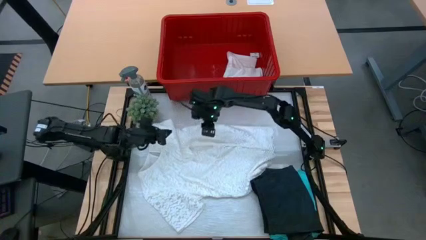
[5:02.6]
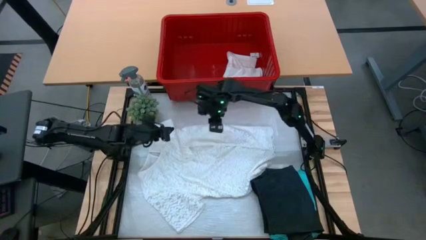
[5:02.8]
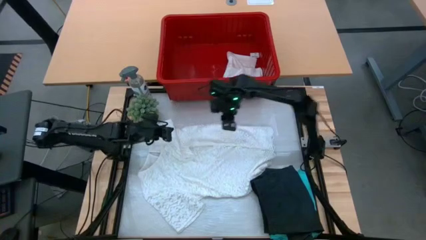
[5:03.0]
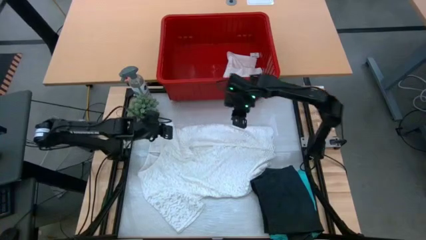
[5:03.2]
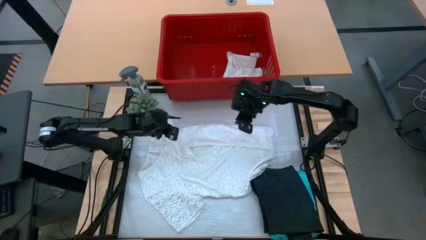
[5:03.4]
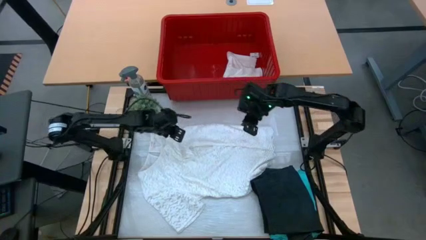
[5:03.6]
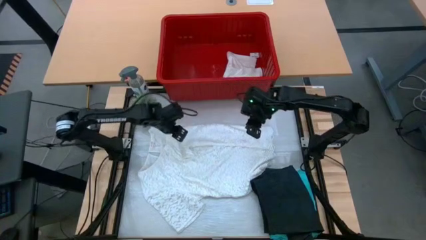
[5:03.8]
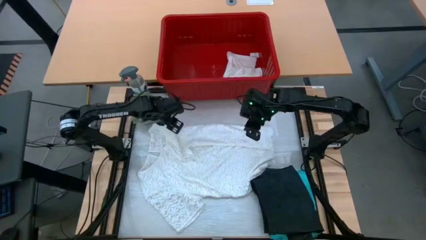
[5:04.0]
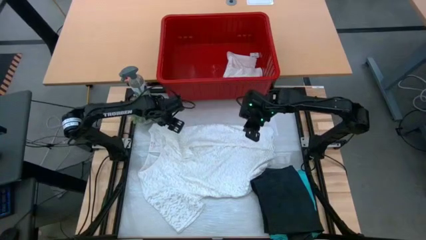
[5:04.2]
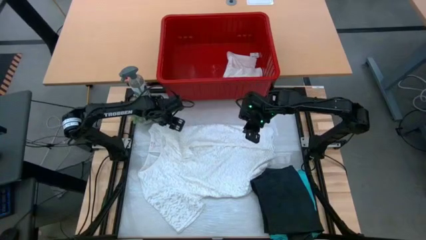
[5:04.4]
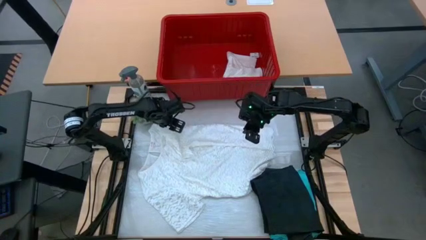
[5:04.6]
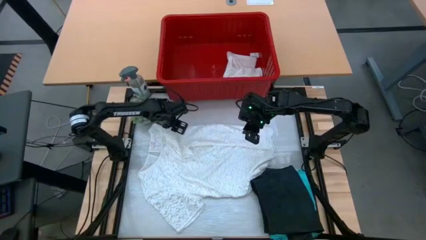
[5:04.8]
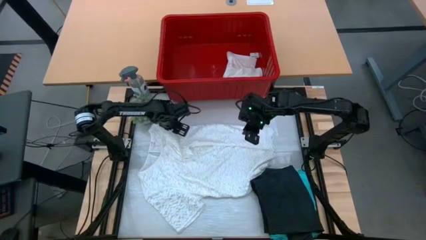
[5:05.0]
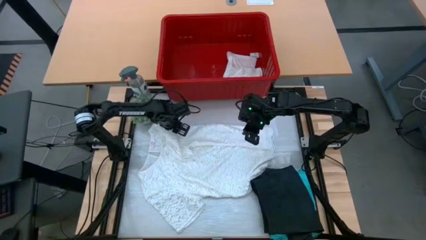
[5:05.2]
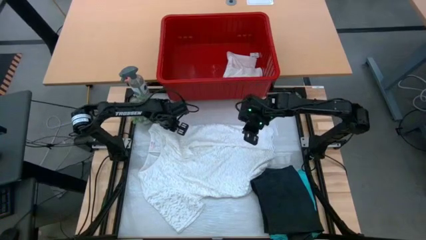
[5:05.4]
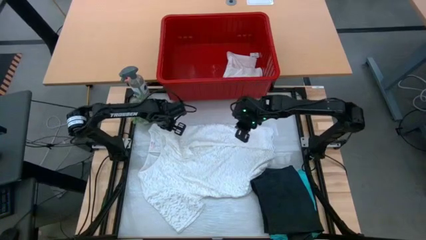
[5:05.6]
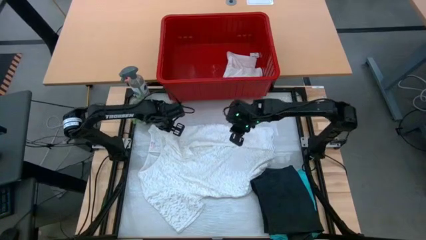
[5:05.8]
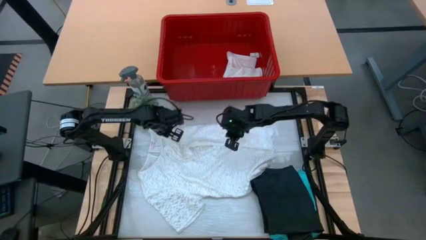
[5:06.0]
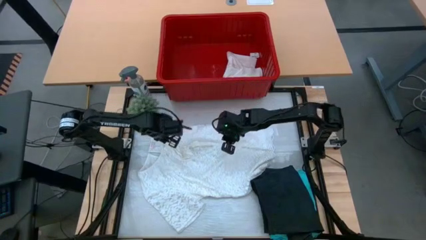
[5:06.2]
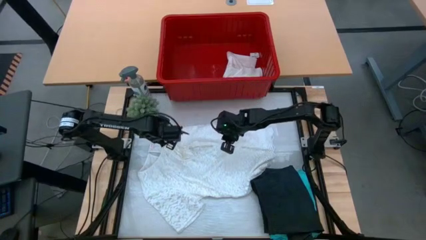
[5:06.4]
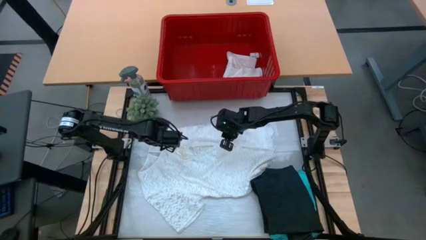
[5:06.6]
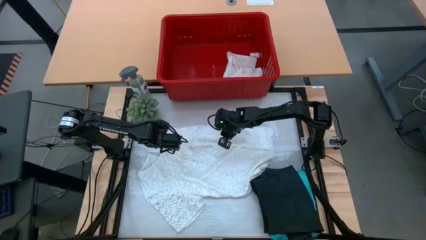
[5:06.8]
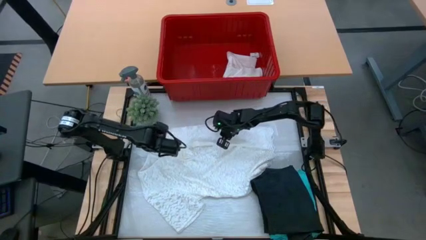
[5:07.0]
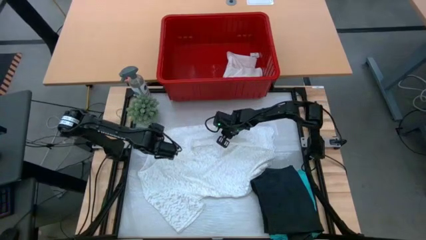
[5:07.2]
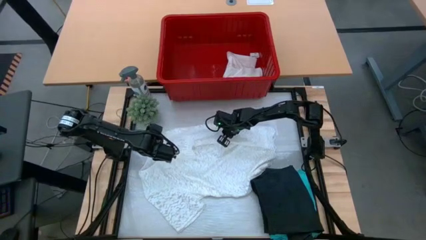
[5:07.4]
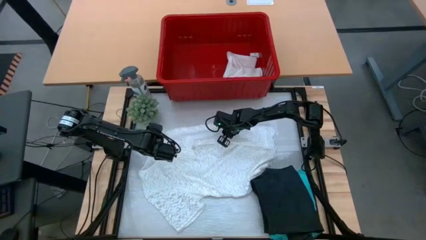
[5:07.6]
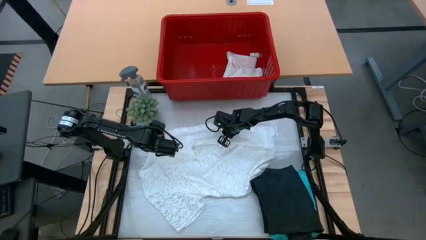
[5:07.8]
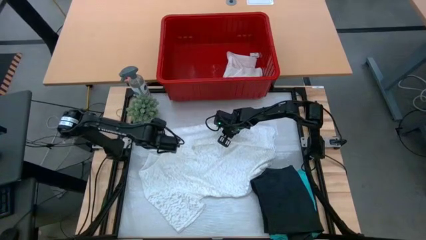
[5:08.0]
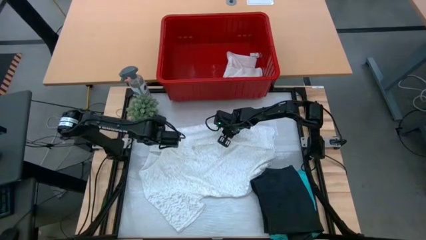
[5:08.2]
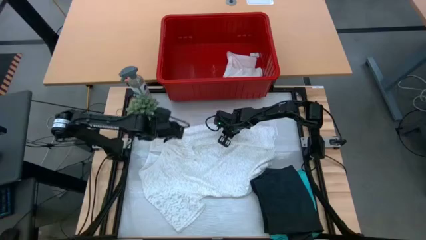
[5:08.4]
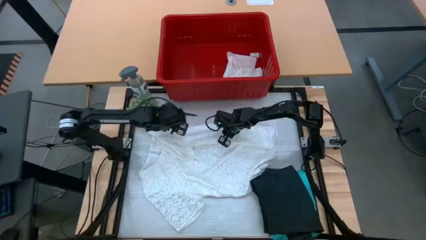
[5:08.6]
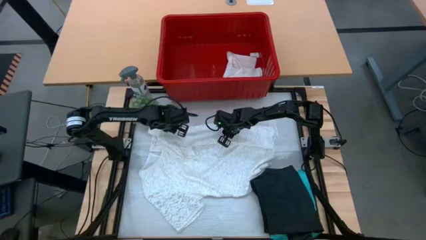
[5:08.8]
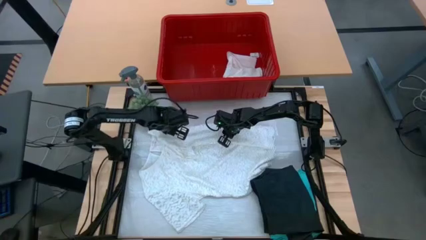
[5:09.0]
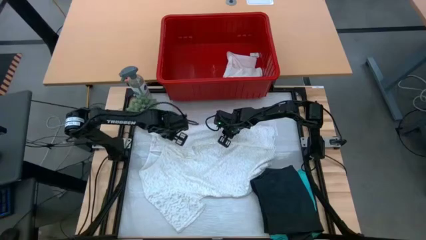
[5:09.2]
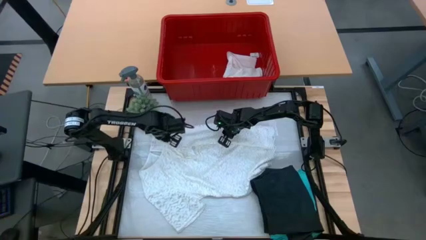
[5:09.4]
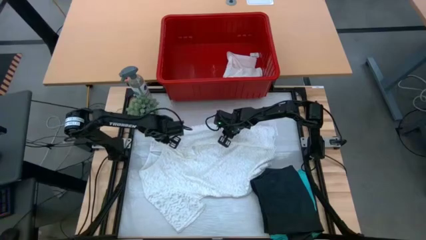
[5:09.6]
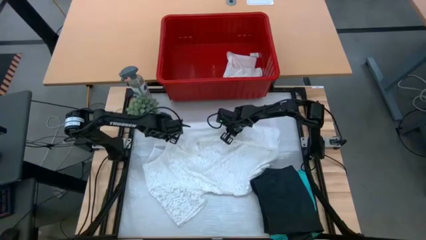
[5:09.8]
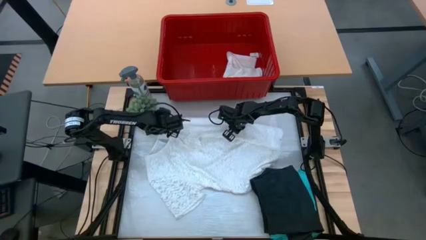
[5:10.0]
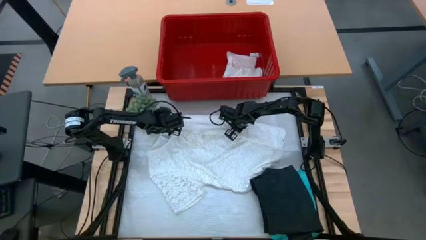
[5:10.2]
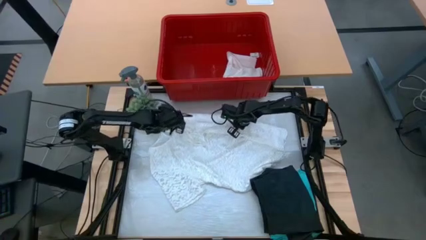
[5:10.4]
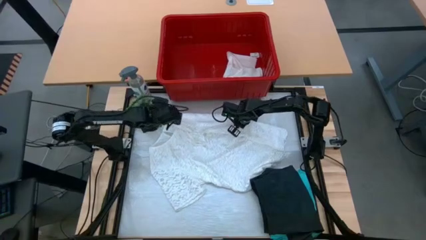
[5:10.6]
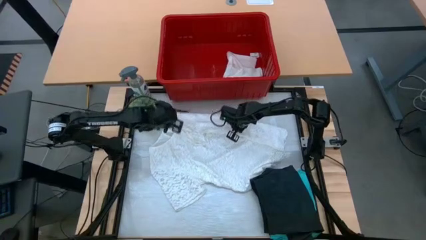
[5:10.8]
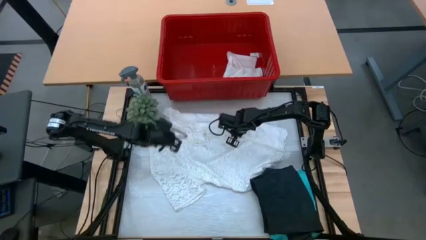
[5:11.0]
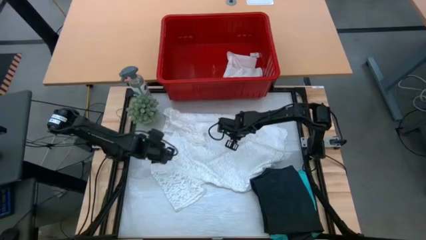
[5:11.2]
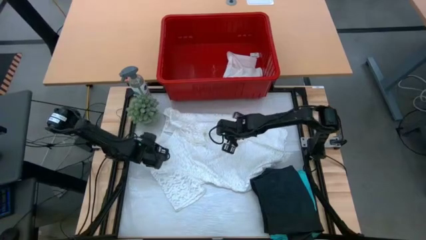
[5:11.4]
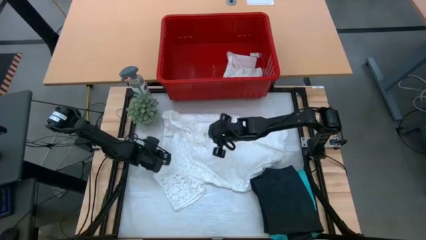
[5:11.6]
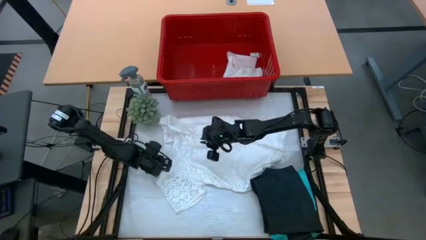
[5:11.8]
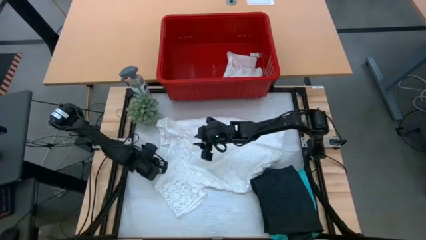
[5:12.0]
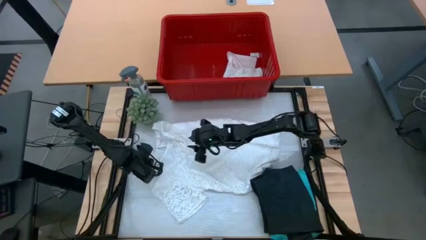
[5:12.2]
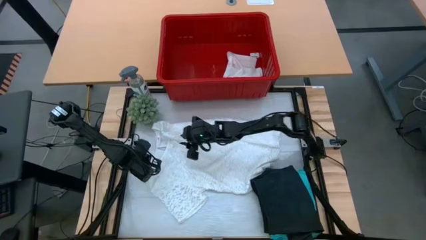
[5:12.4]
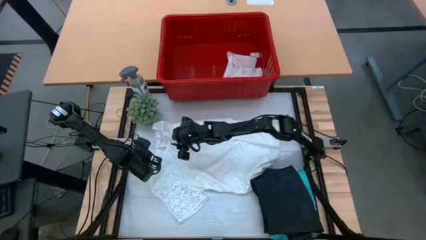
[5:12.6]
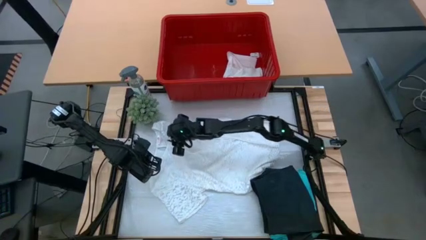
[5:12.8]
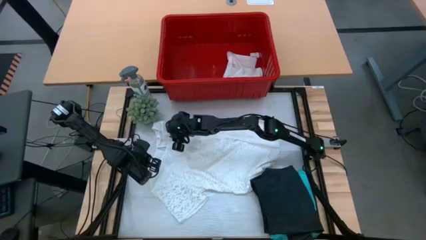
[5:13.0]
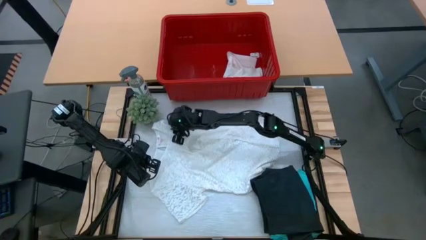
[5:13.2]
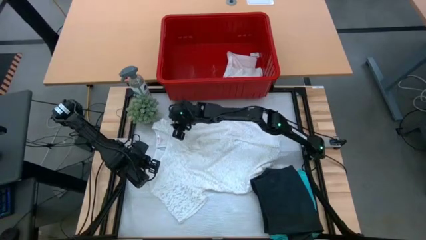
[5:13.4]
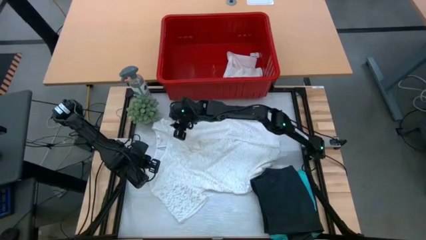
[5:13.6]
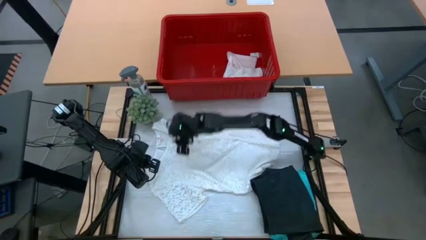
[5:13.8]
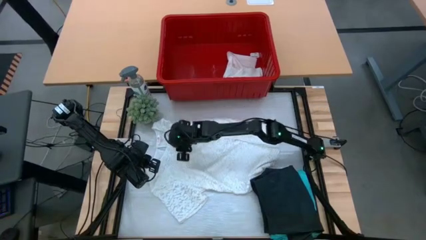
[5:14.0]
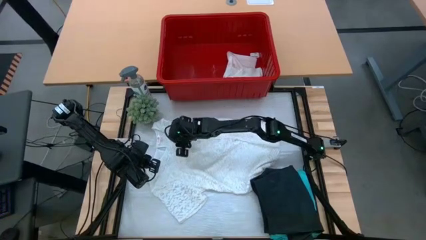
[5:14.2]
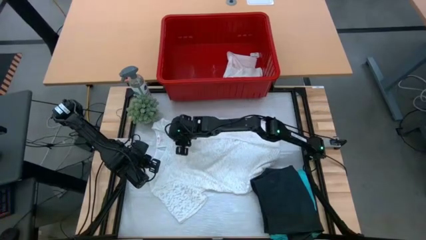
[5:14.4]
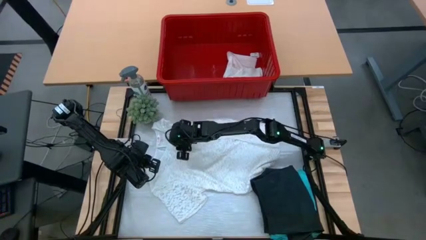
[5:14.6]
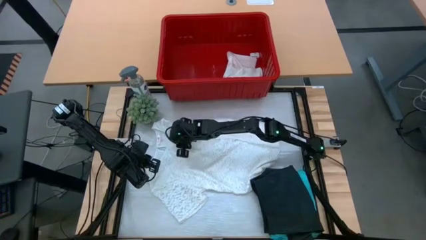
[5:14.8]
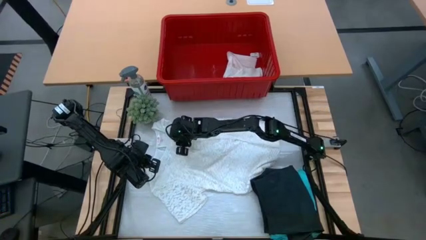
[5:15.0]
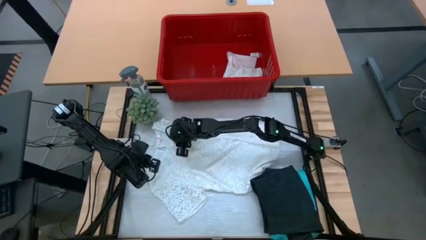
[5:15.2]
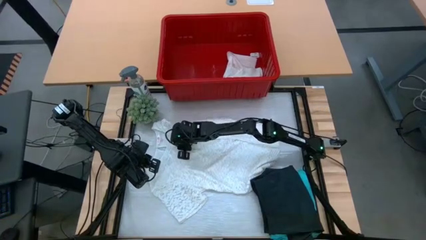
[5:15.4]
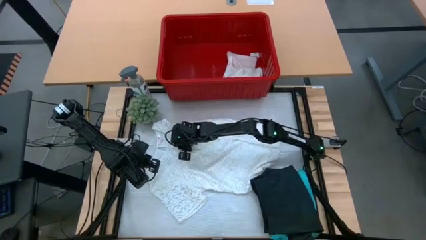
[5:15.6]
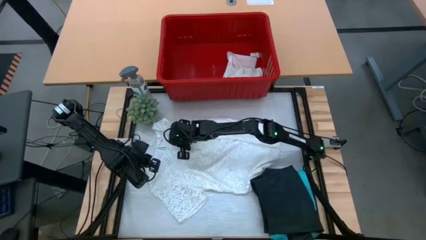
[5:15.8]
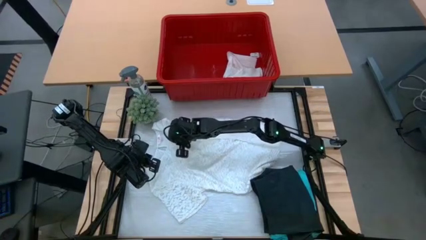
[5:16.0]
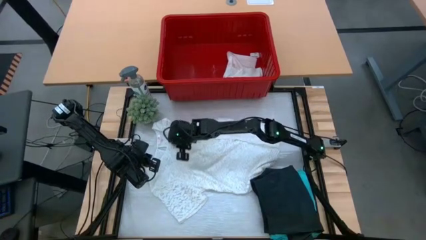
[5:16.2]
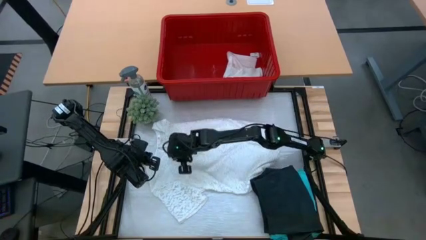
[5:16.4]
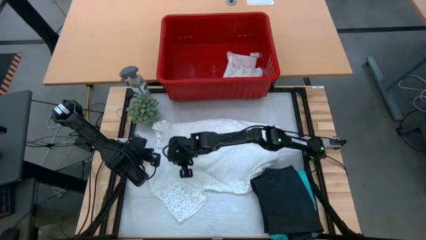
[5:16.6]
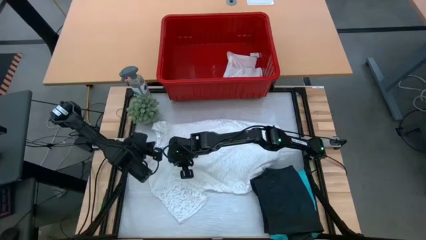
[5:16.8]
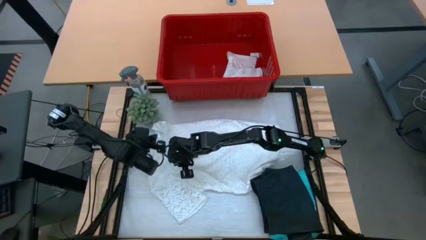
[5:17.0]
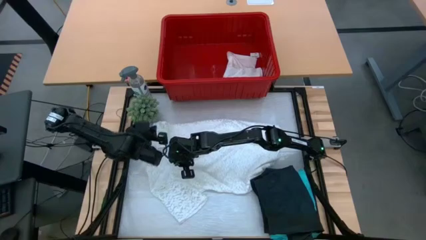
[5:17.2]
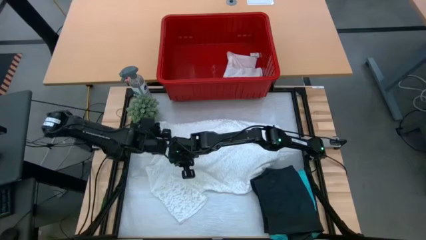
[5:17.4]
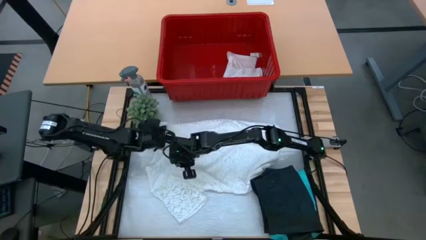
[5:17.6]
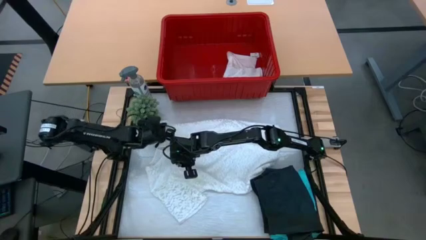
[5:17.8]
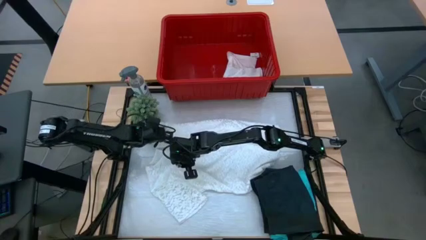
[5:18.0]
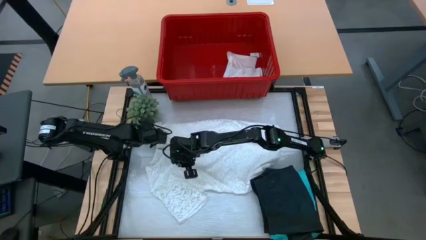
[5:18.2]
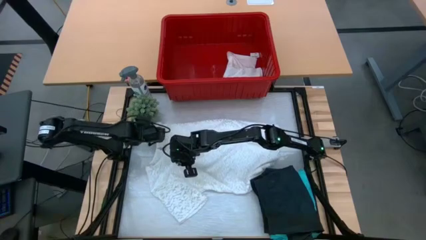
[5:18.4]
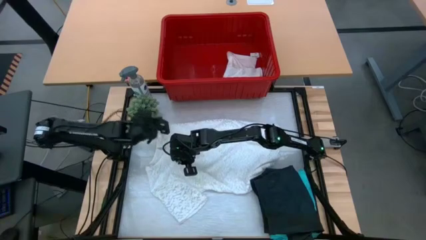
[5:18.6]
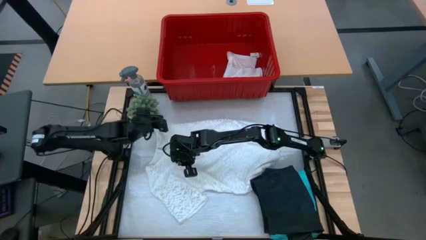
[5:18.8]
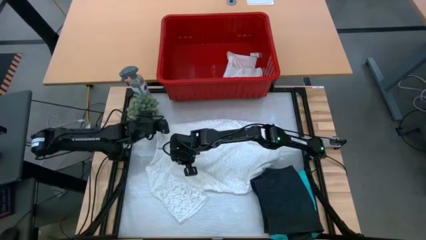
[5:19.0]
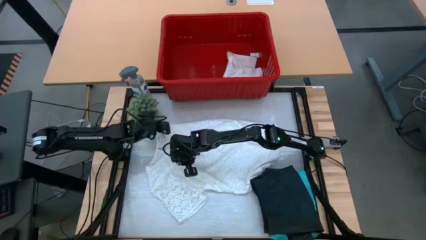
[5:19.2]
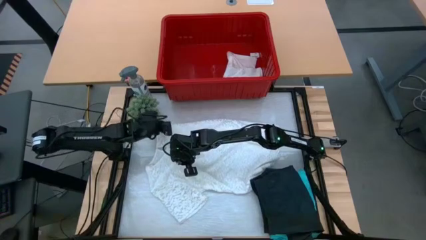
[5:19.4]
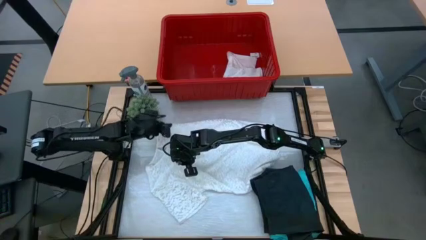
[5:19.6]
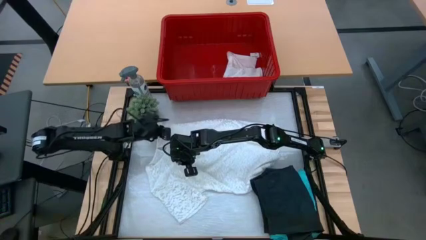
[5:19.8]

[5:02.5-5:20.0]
Task: Fold Laundry from Bin
Fold the white t-shirt
